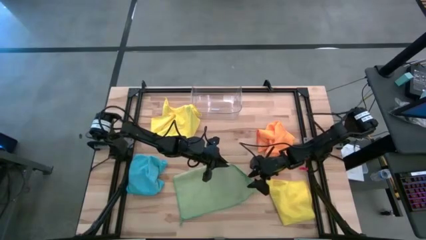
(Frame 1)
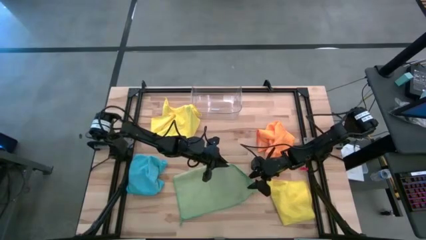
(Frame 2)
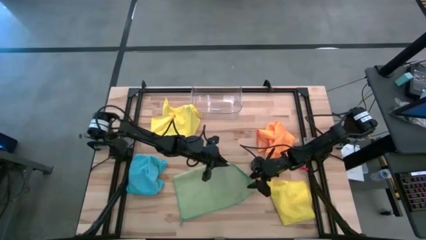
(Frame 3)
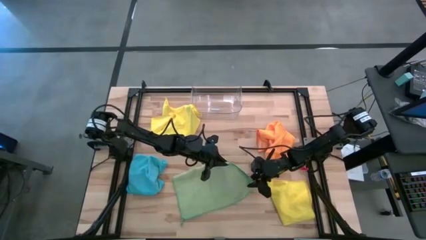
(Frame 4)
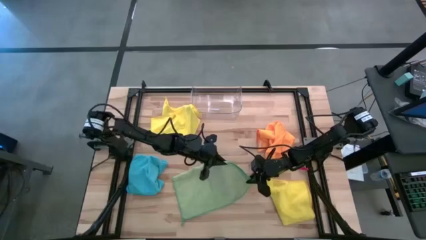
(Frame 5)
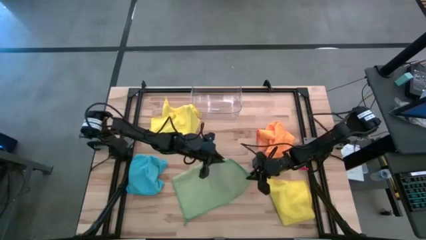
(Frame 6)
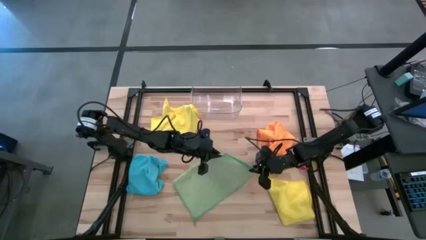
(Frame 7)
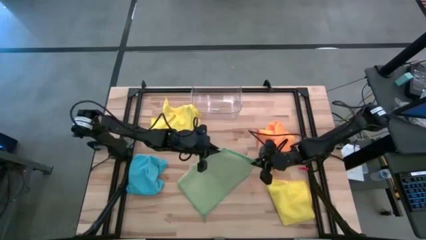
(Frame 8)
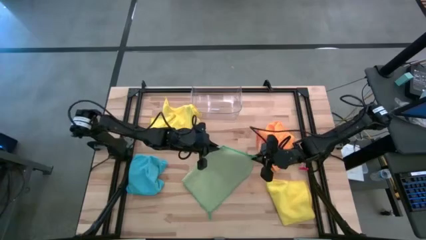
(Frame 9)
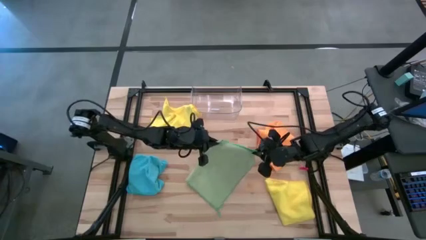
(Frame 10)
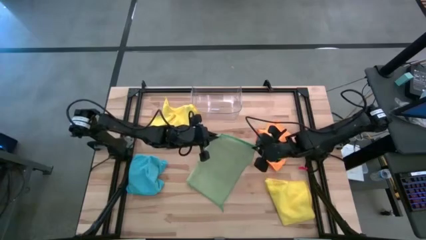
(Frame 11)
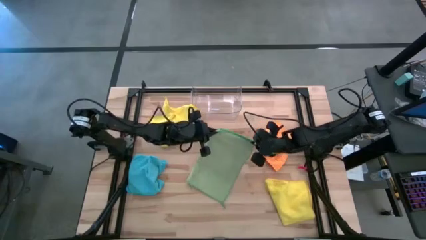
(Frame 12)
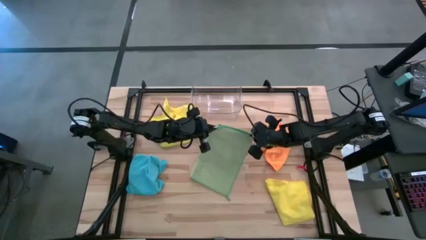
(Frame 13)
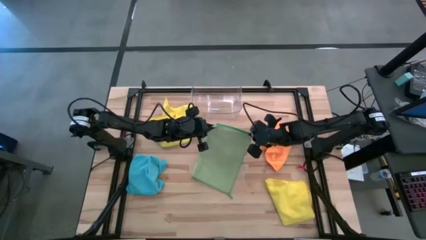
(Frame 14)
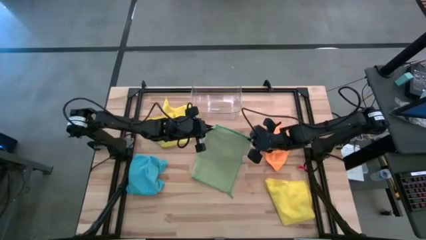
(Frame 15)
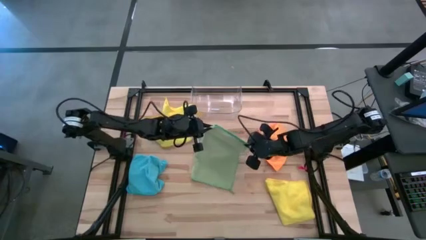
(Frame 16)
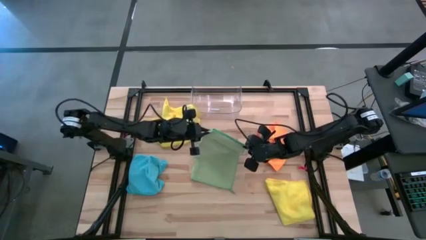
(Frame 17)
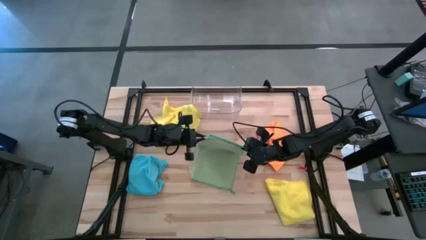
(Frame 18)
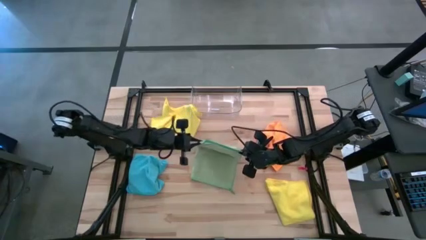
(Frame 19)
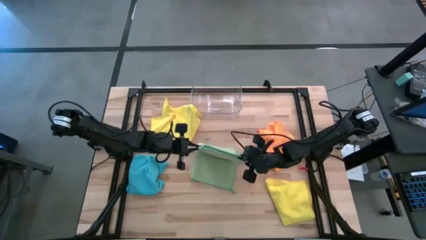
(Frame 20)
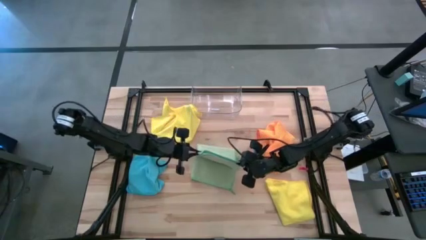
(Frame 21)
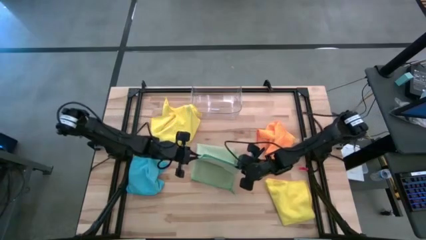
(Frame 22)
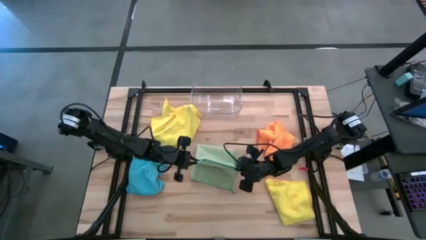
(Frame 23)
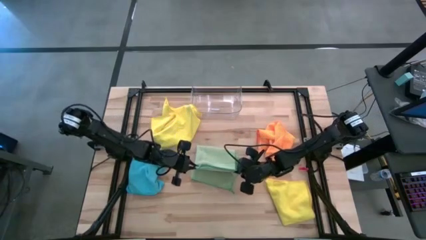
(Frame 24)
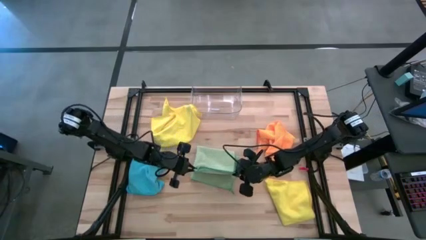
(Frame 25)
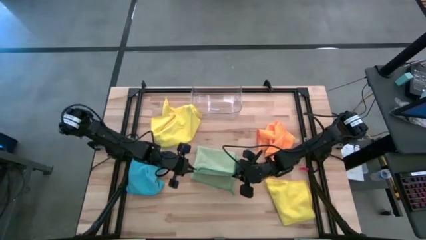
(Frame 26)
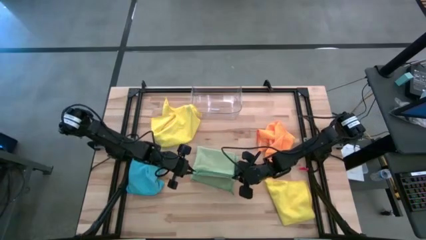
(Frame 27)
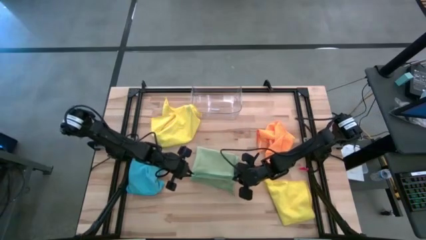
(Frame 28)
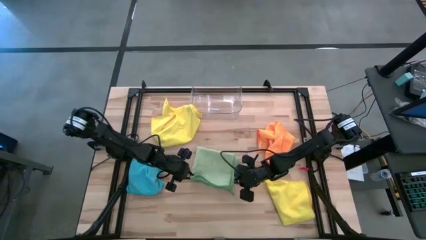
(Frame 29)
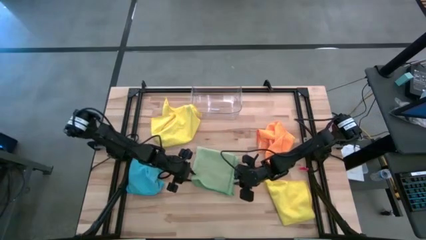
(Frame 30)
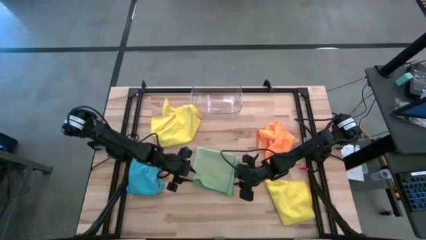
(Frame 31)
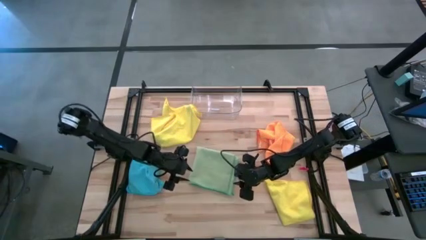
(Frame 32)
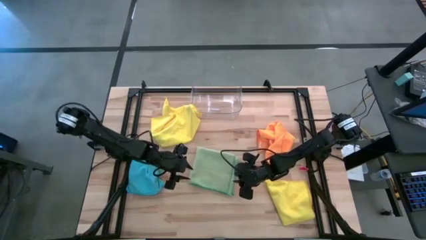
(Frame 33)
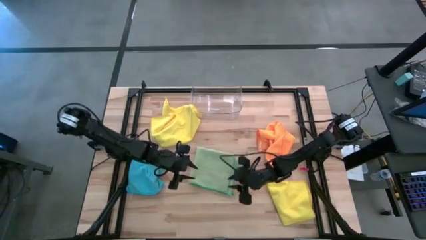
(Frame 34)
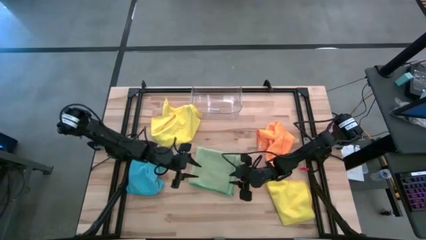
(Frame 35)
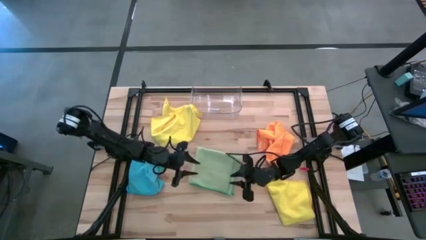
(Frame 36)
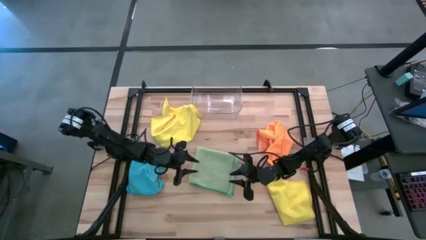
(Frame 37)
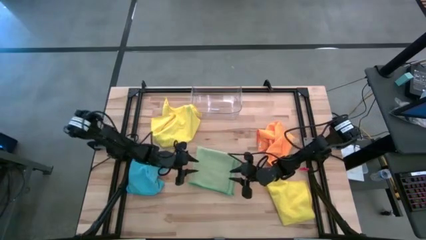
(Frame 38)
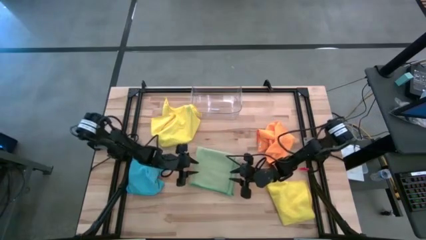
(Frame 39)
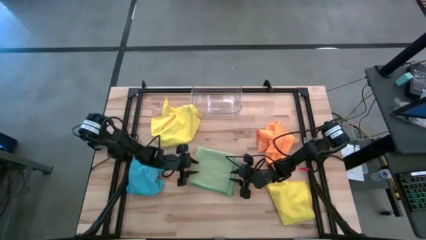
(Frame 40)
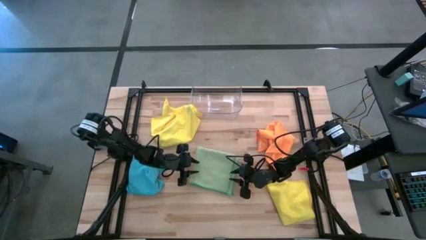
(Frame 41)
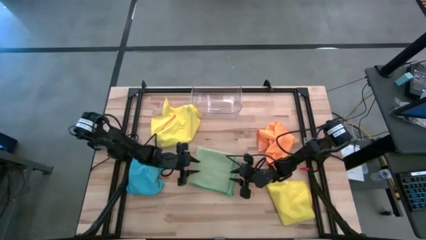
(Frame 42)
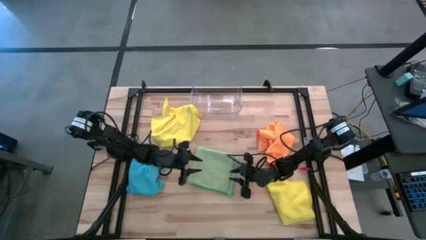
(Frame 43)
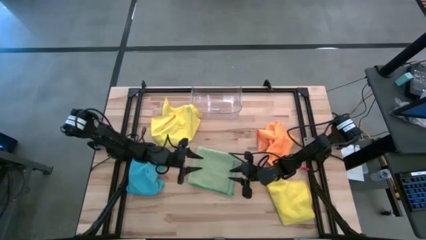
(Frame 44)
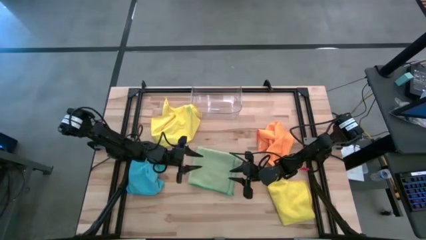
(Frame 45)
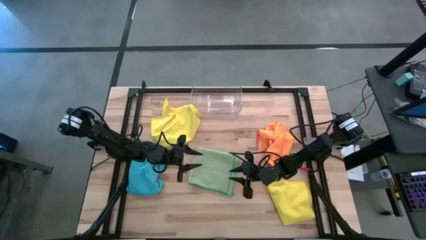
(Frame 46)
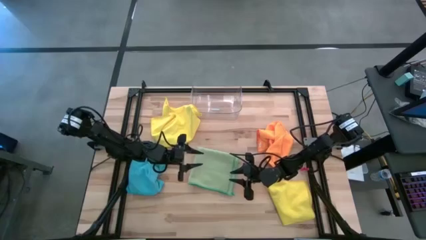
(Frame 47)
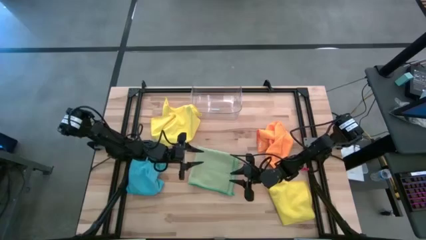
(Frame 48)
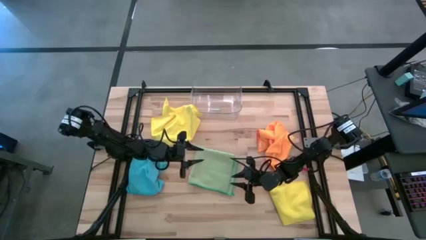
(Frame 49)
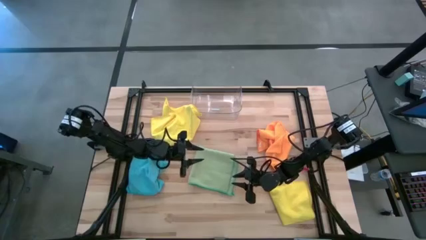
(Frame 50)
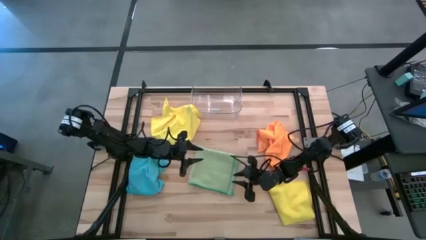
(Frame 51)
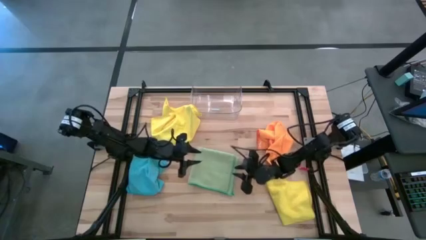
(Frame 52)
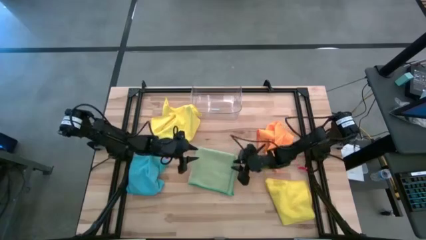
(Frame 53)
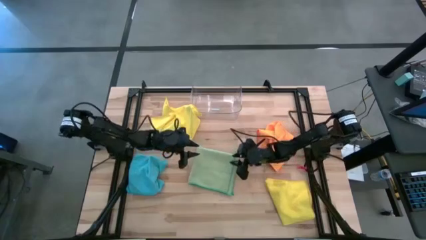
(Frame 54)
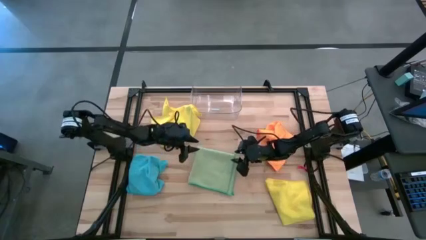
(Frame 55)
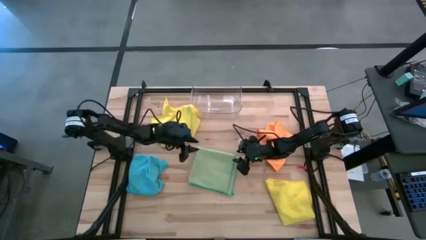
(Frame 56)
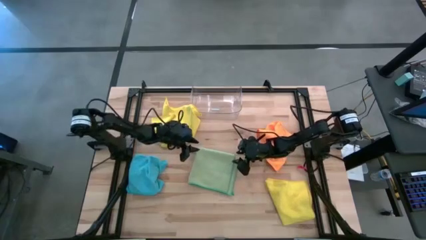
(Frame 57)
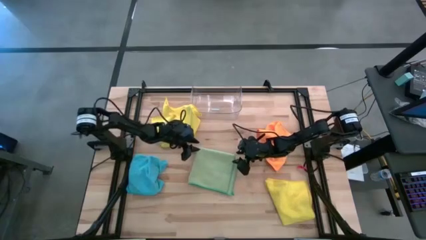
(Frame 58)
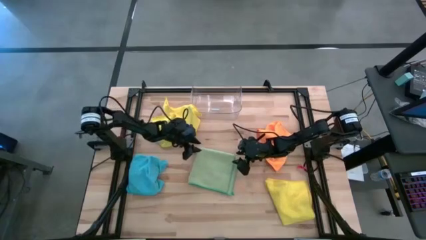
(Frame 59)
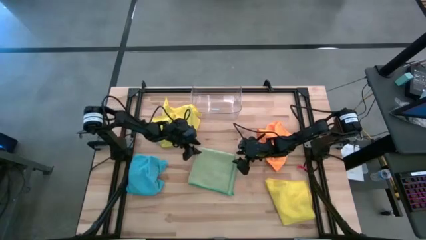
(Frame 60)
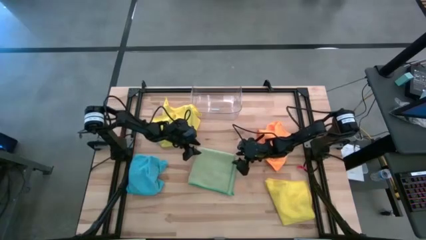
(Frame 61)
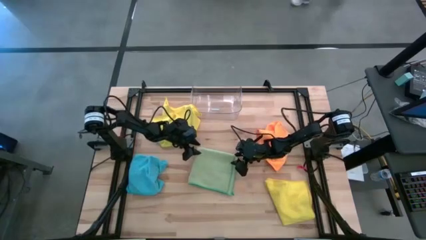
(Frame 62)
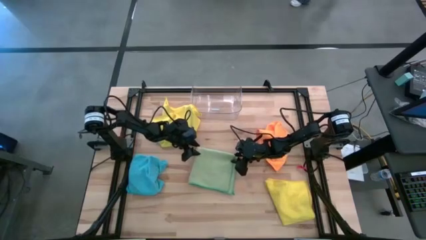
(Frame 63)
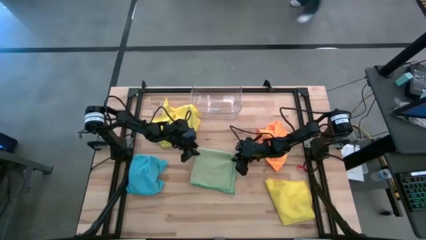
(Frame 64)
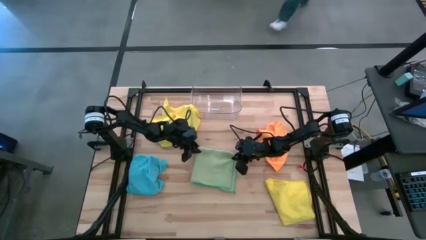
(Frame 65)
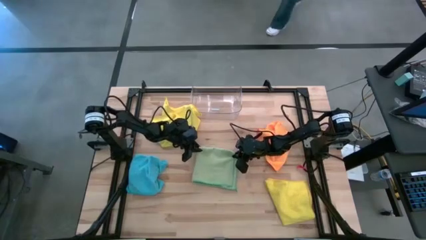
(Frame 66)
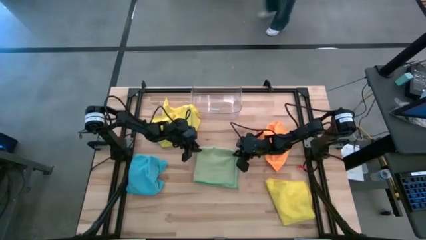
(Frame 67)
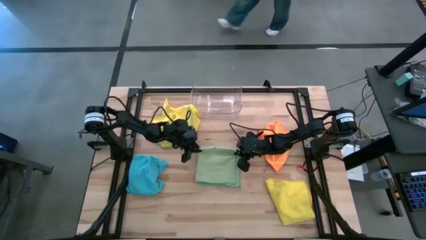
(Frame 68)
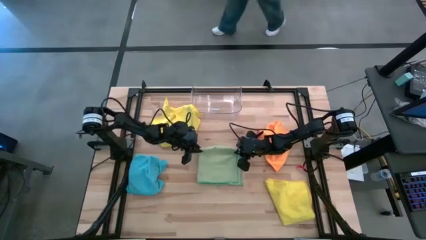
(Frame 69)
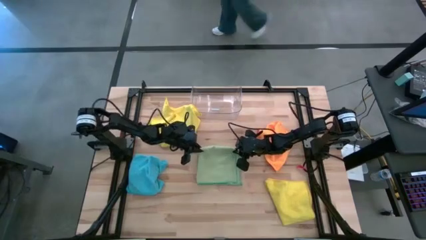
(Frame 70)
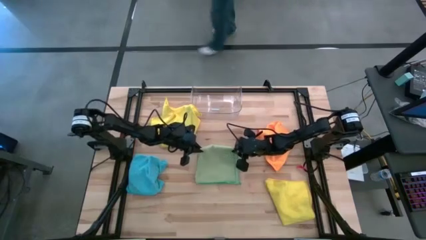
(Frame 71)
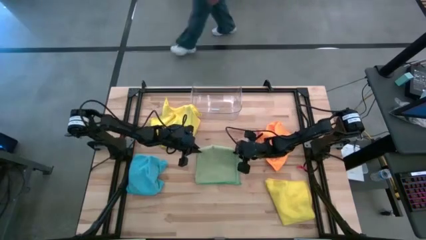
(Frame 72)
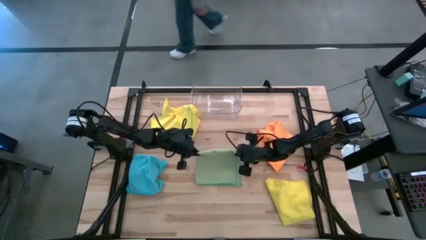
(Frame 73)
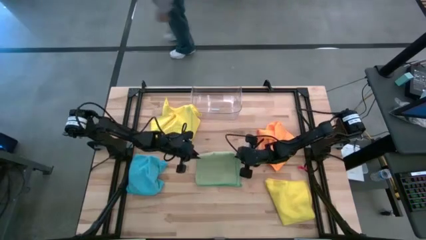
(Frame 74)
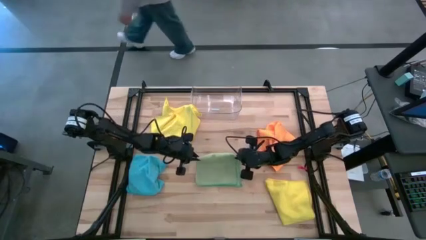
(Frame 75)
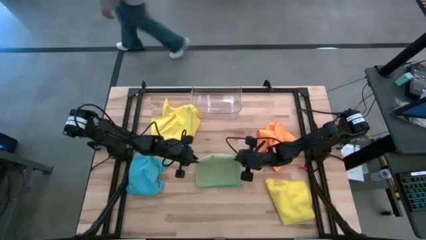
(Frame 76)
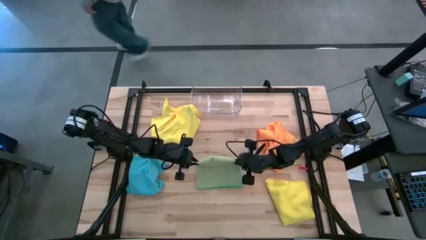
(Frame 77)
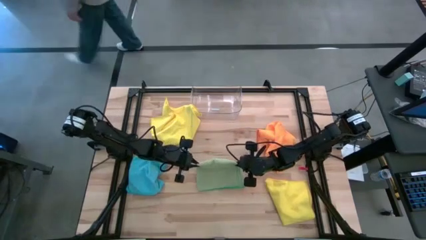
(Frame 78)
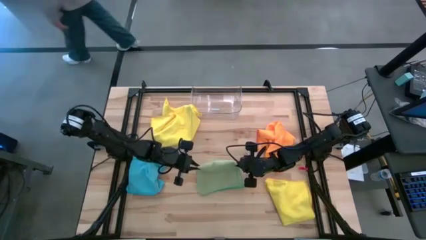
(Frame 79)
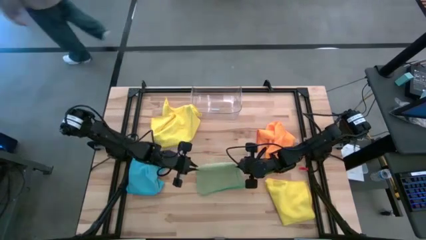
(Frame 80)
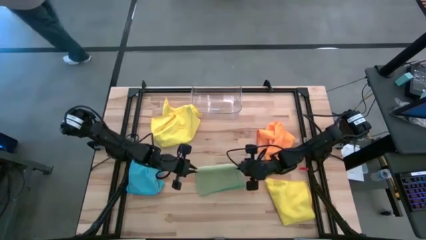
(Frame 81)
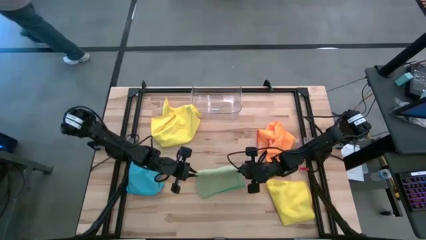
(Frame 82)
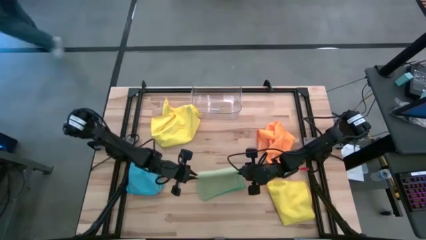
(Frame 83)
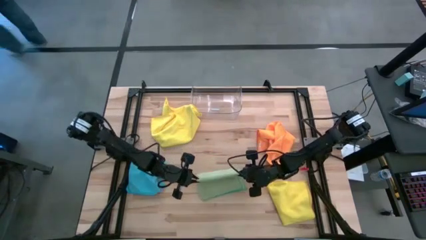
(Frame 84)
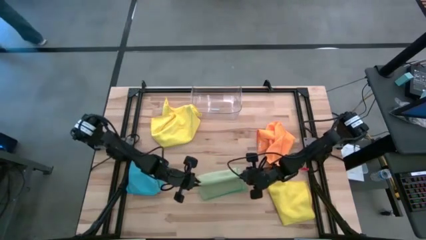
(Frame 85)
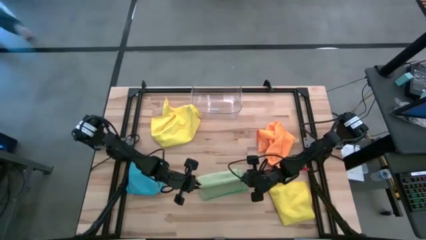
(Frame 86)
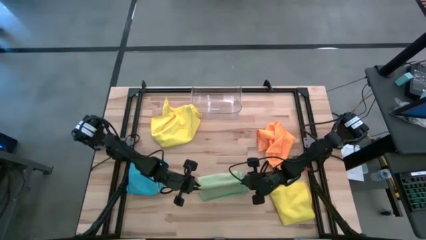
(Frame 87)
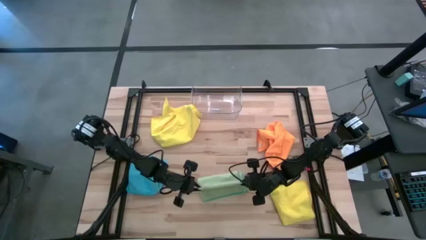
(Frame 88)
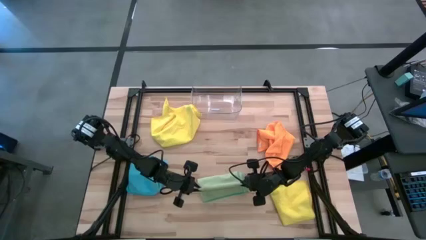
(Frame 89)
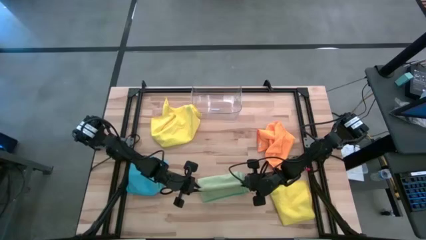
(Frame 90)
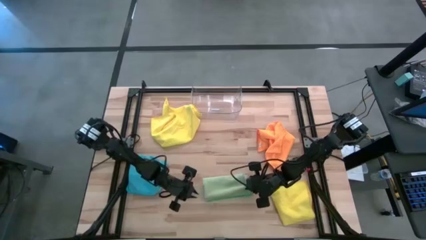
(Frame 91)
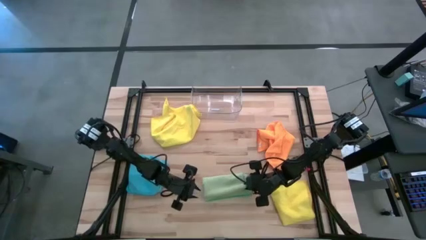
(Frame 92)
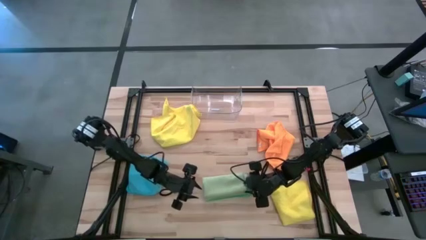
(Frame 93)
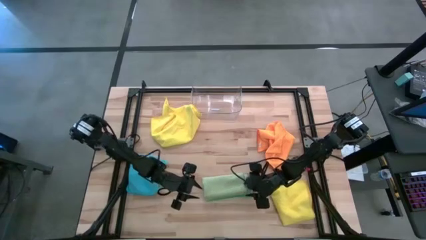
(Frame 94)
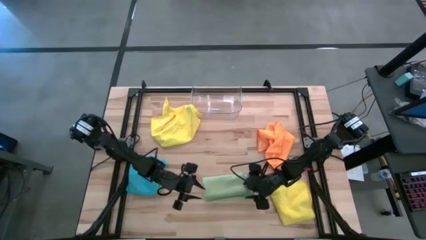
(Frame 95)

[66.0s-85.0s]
Task: Fold microfiber towels
Fold the light green microfiber cloth
